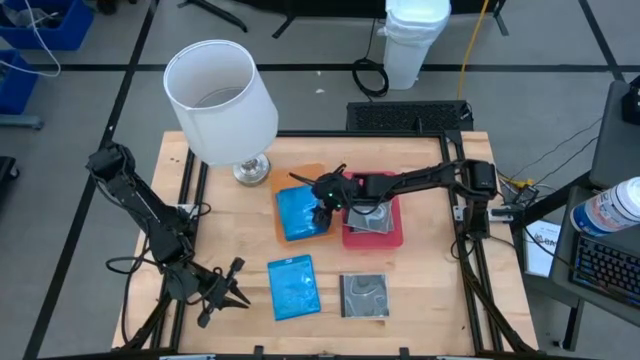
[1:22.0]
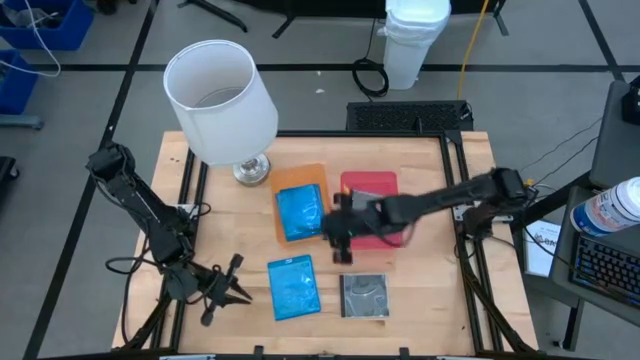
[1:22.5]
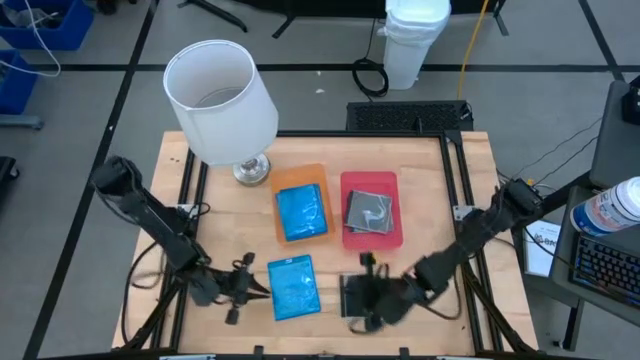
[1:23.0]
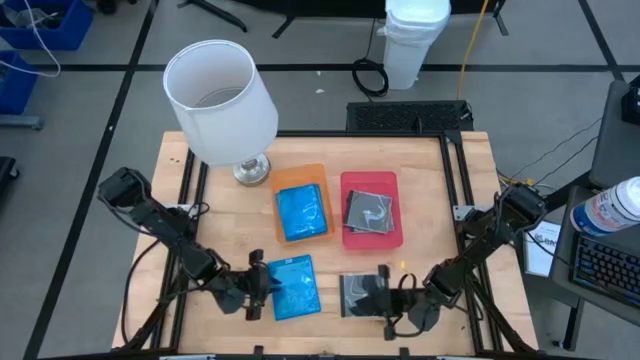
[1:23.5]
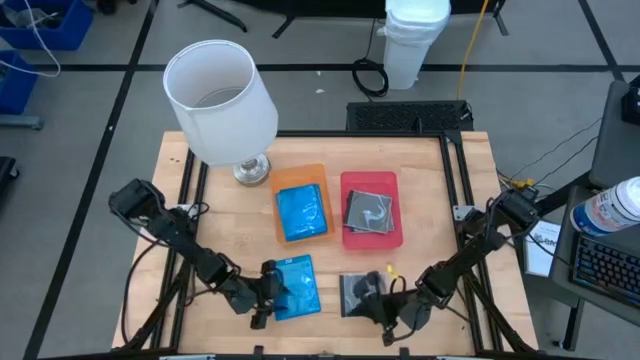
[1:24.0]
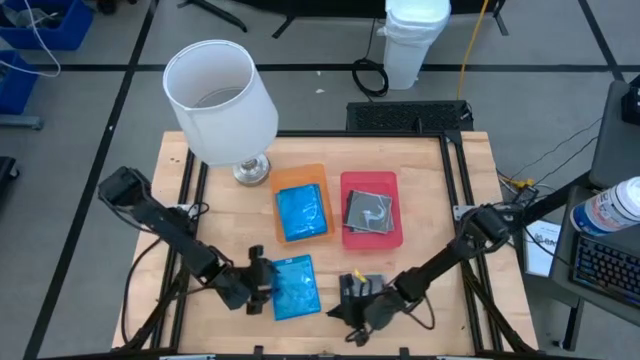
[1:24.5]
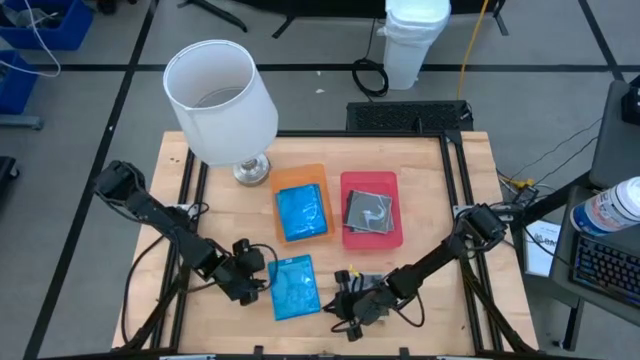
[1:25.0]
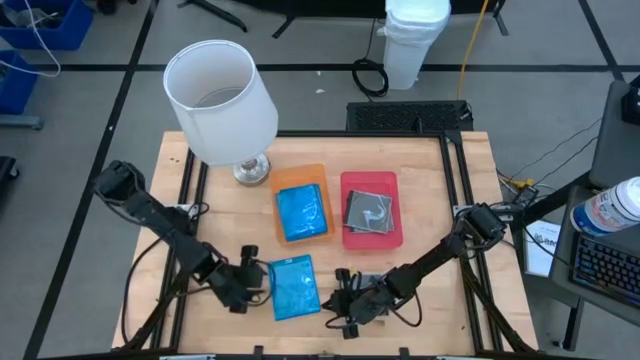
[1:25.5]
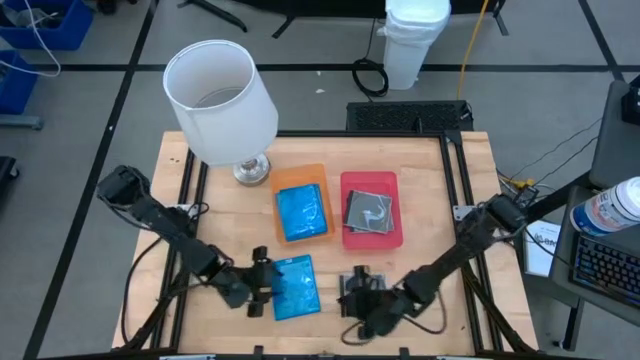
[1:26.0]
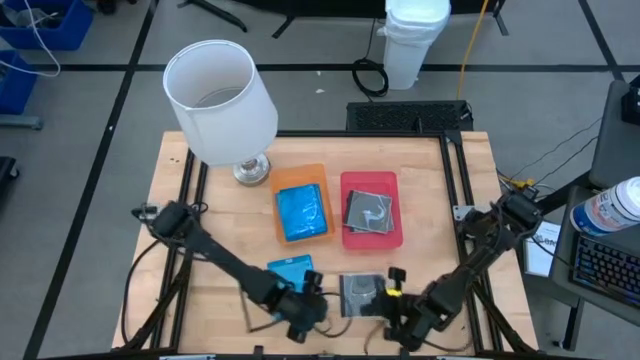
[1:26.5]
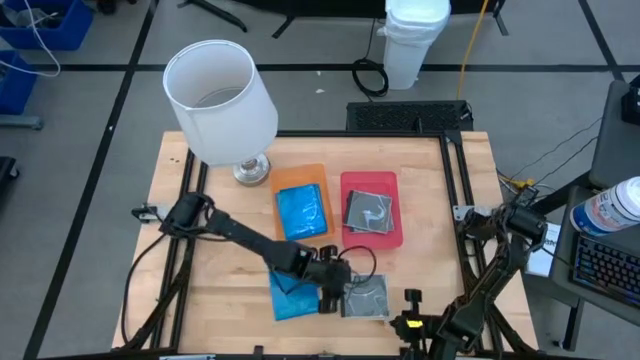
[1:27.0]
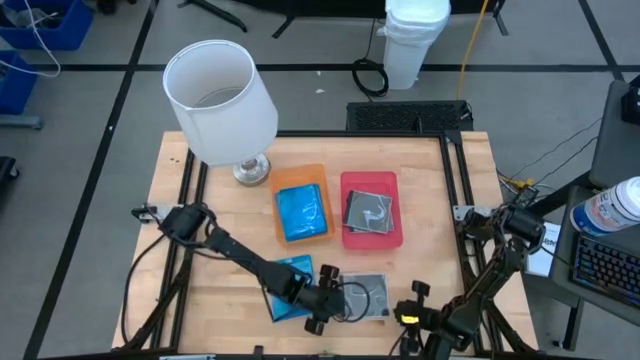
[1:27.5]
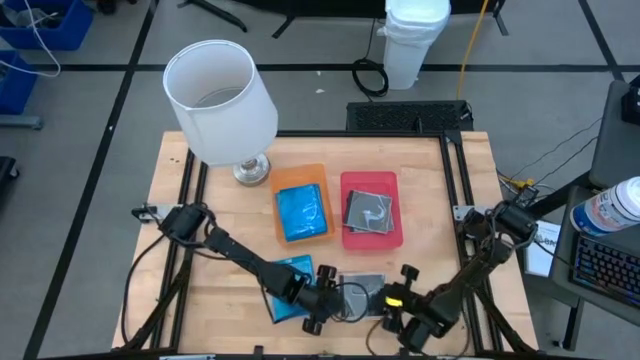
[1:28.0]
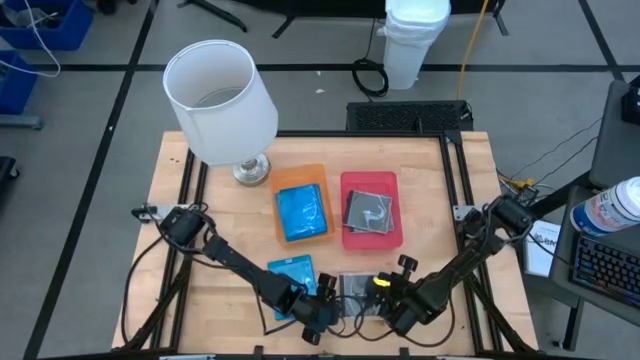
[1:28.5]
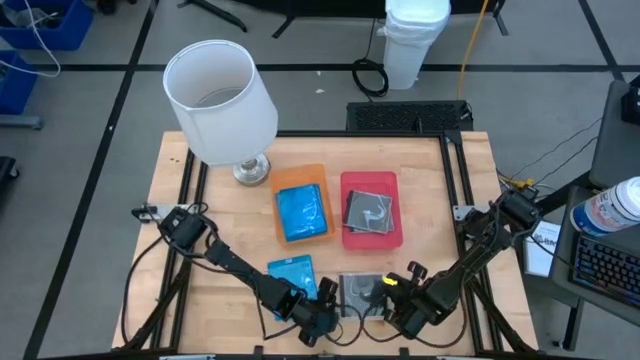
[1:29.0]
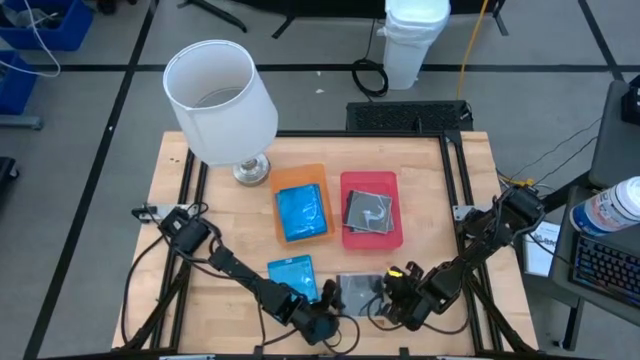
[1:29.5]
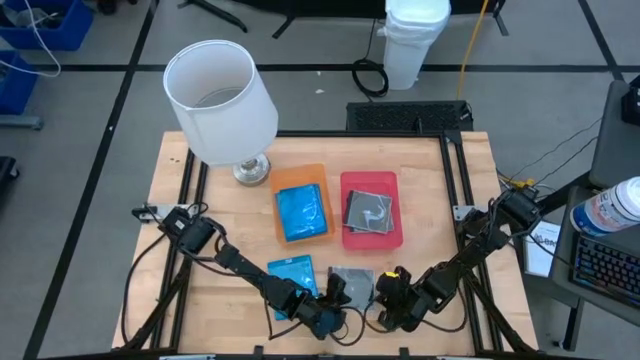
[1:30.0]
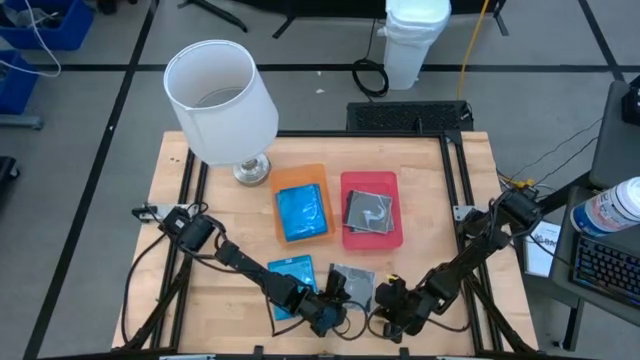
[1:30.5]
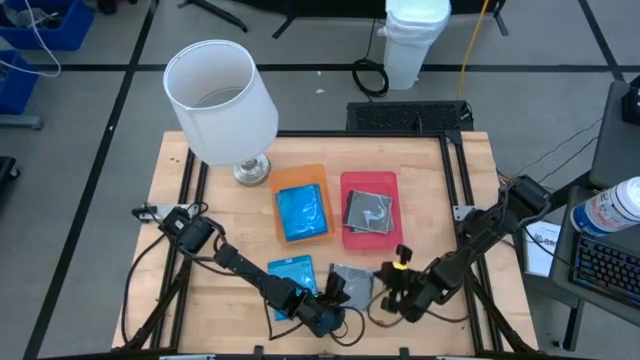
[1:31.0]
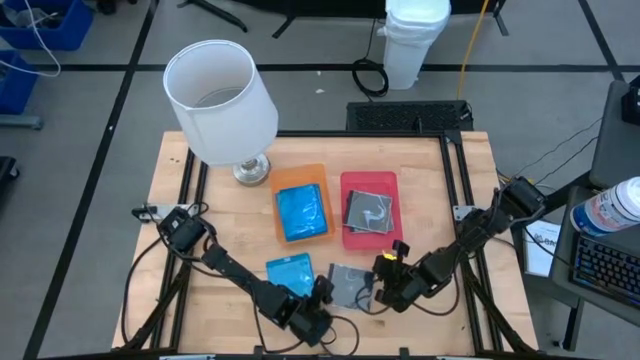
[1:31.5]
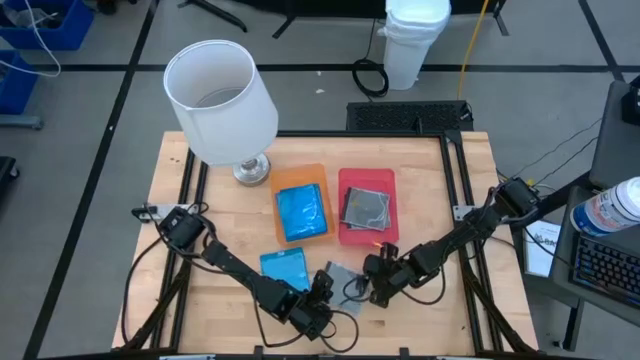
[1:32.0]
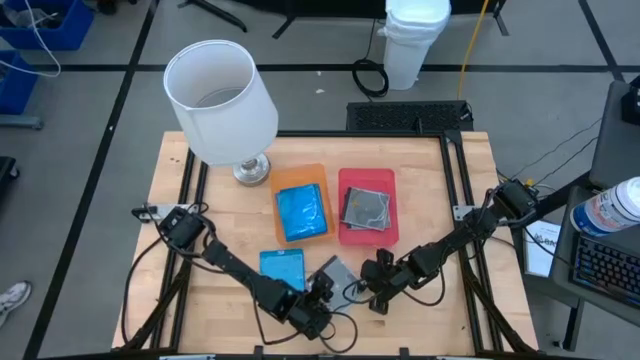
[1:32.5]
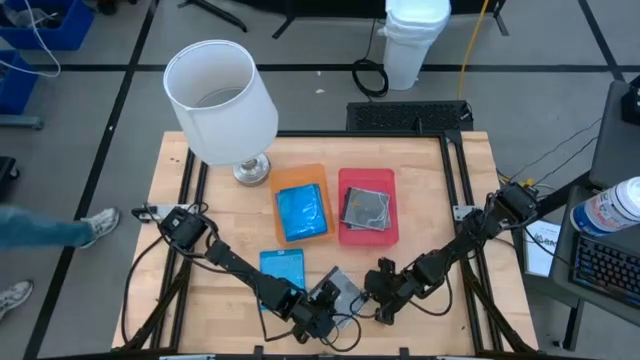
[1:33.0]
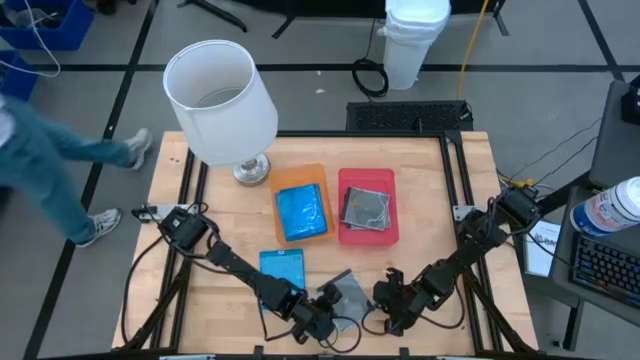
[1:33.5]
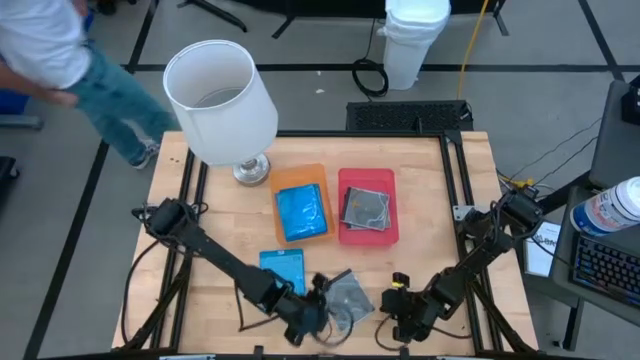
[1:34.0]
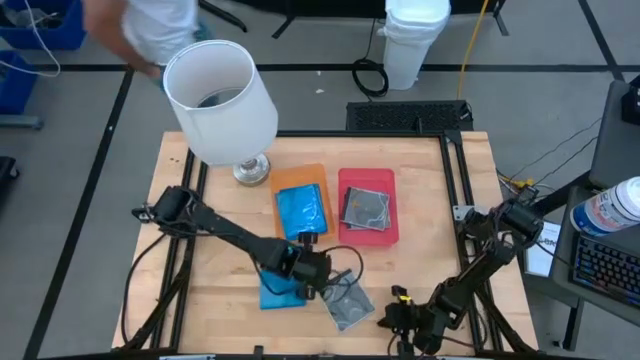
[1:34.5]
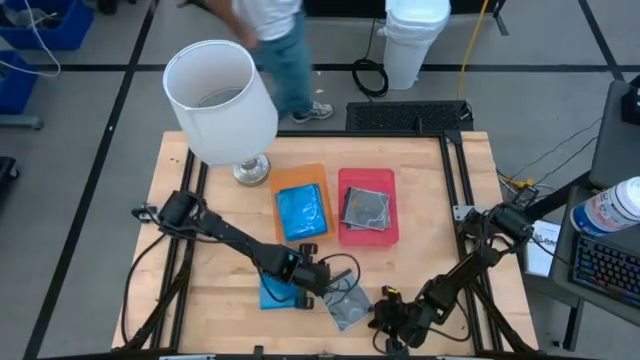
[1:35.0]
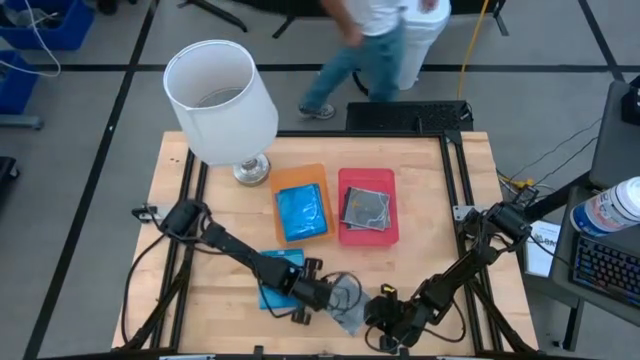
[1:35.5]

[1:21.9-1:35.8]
Task: Pick & place jewel cases by type
Put the black CD case into the pink bin

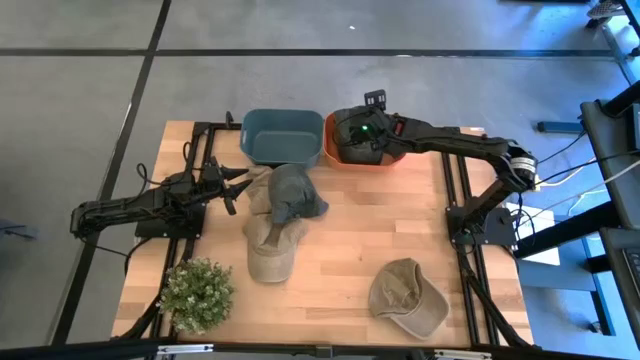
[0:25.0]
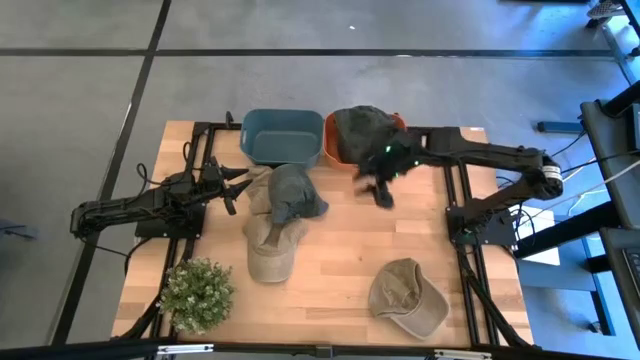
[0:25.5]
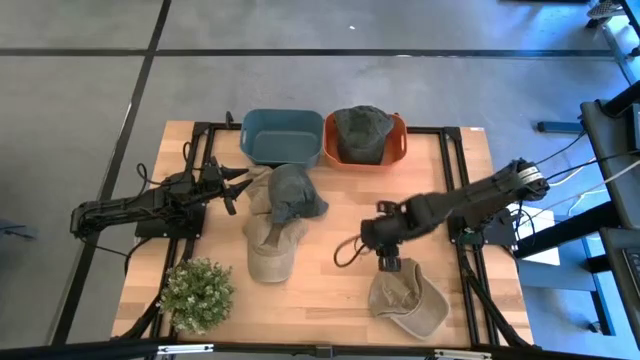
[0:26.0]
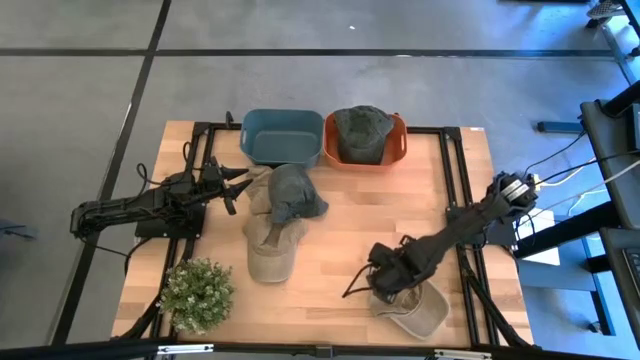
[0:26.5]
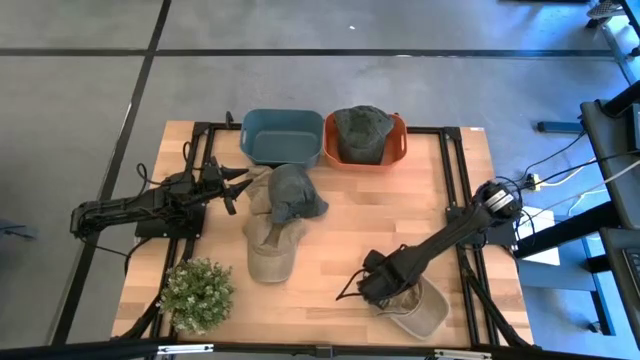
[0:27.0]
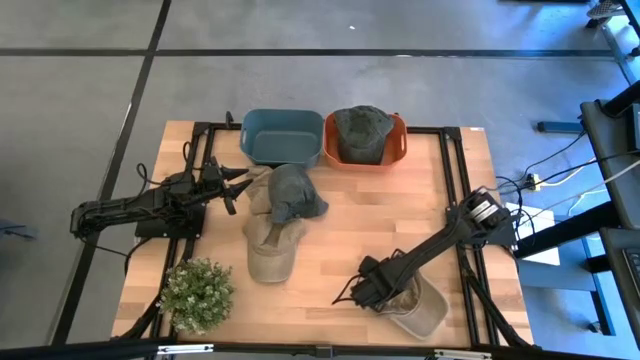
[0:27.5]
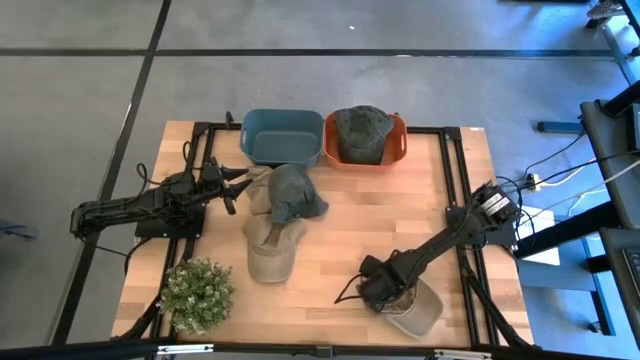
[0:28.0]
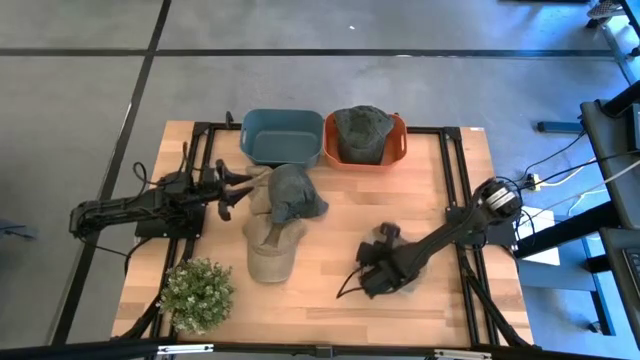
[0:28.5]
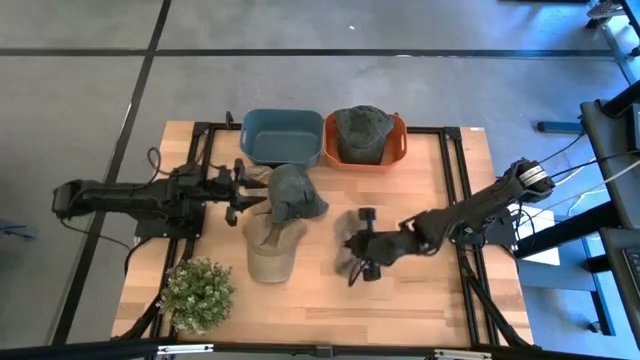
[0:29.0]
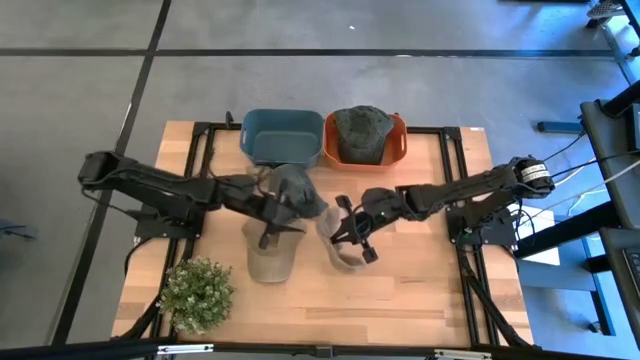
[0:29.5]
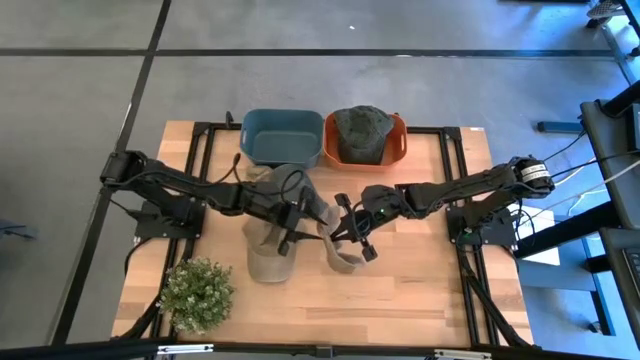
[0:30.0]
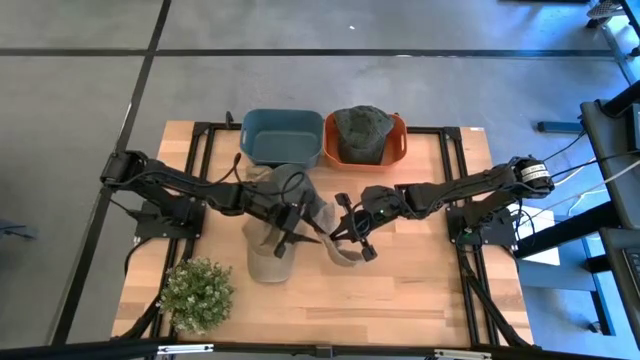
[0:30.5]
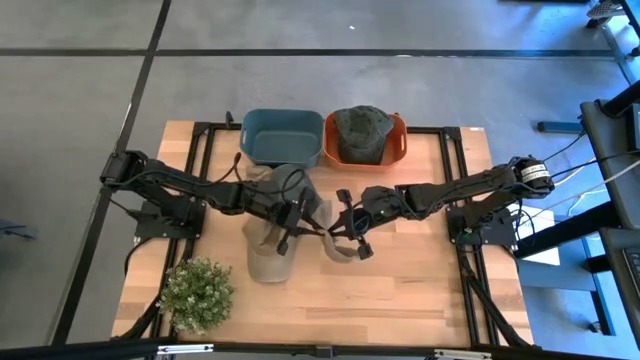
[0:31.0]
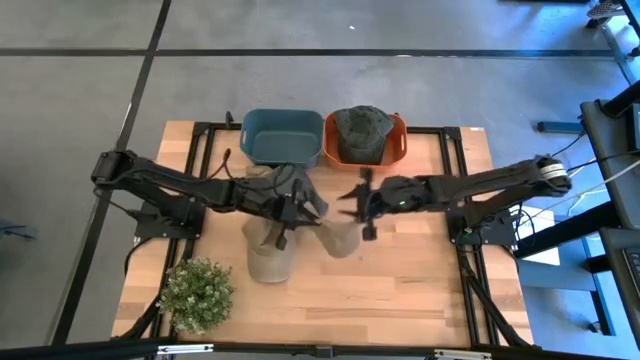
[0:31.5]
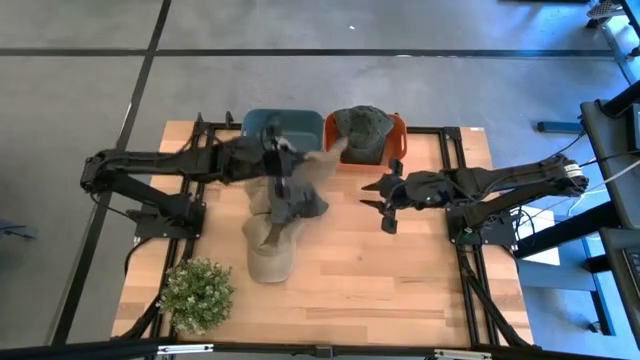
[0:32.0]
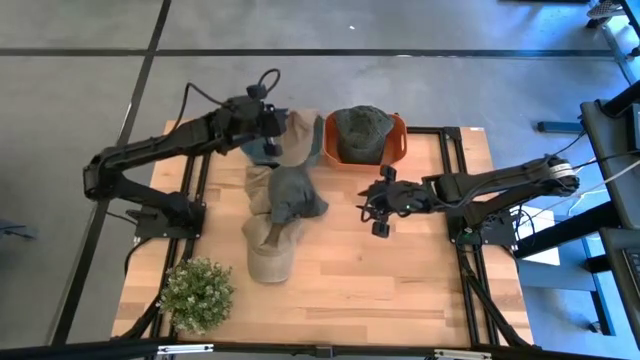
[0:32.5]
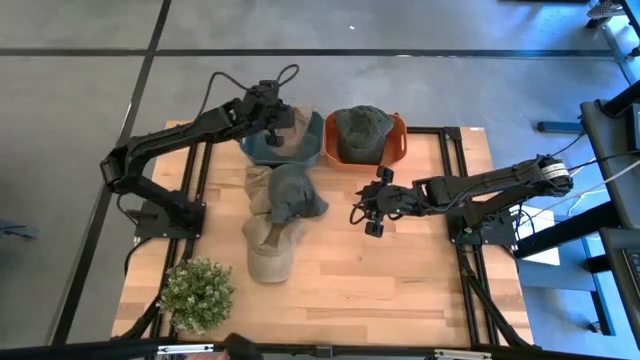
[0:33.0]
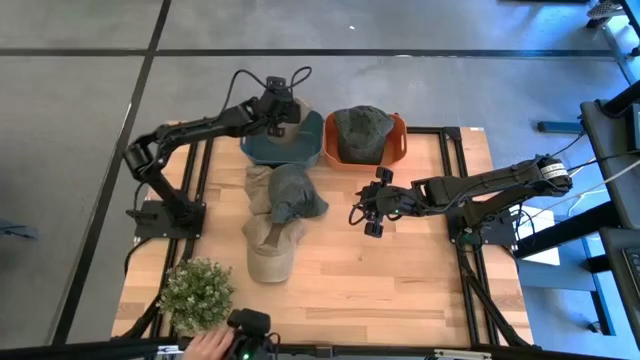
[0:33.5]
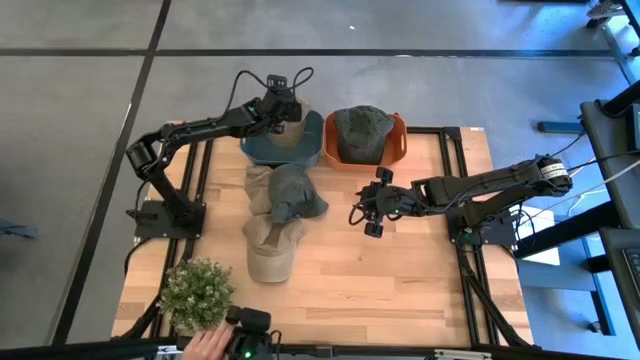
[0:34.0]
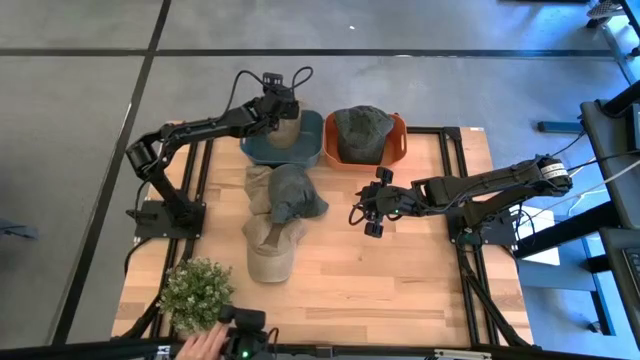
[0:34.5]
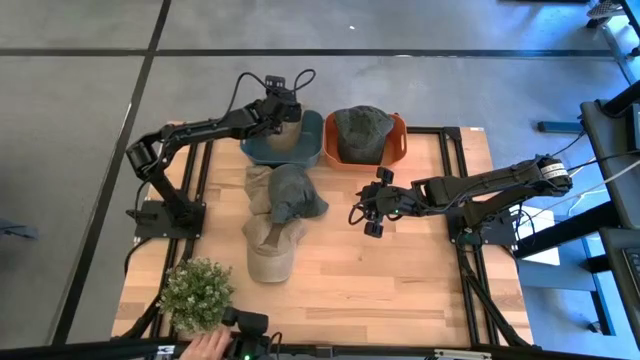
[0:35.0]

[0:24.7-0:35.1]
Task: Pick & Place hat
Put the bottom brown cap into the dark blue bin
